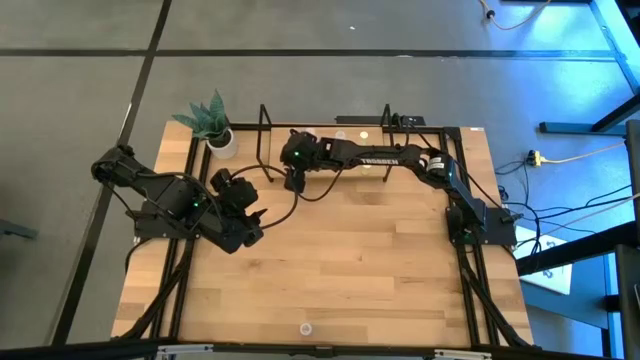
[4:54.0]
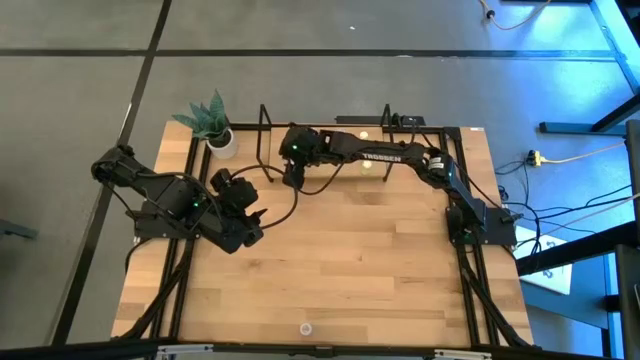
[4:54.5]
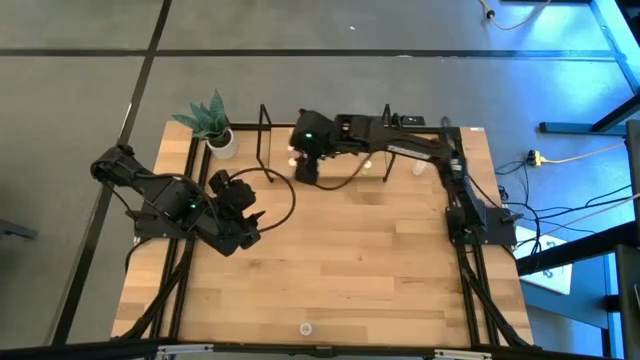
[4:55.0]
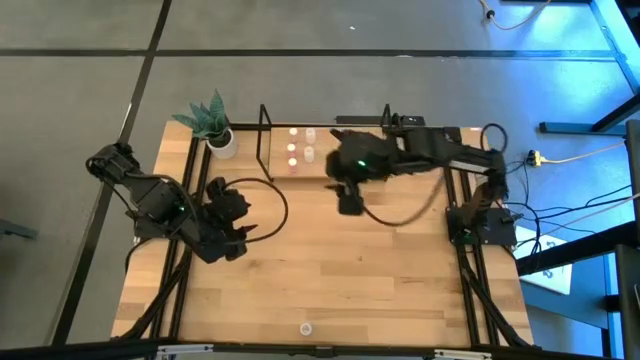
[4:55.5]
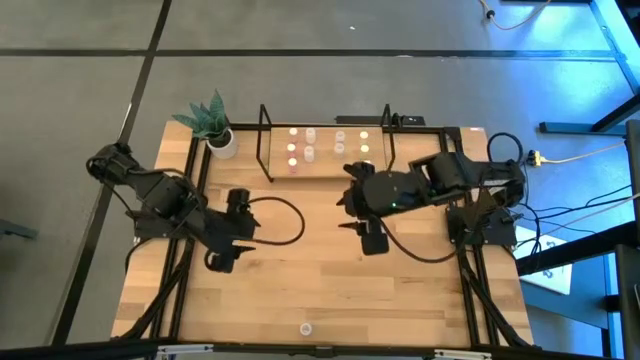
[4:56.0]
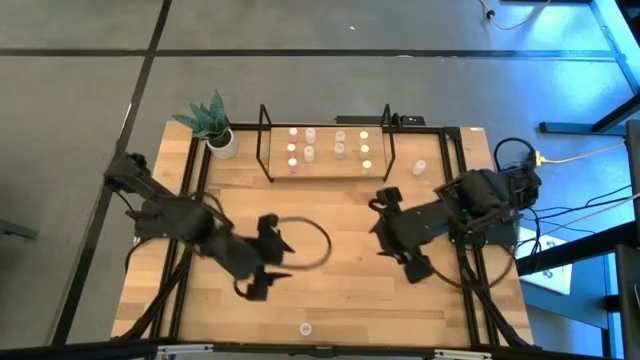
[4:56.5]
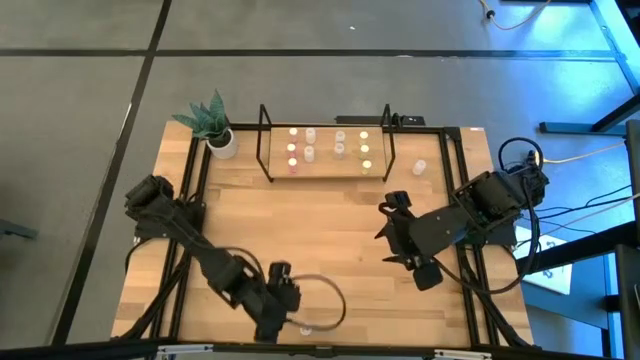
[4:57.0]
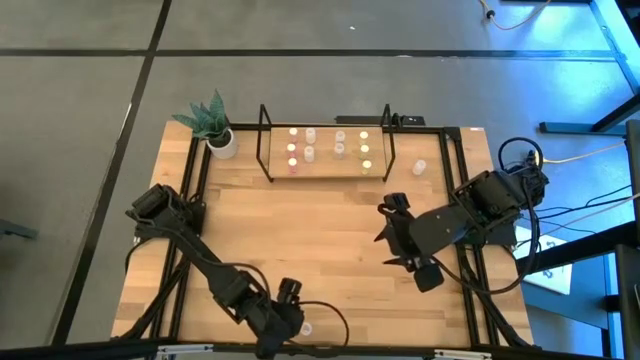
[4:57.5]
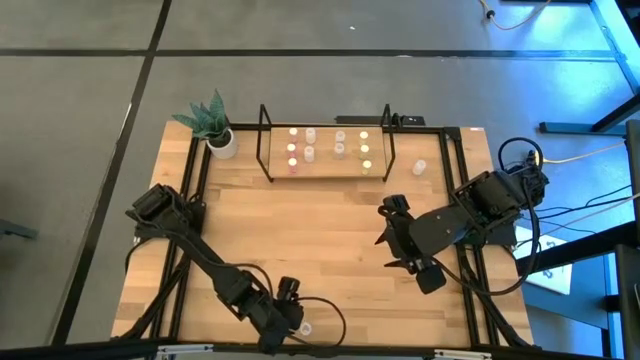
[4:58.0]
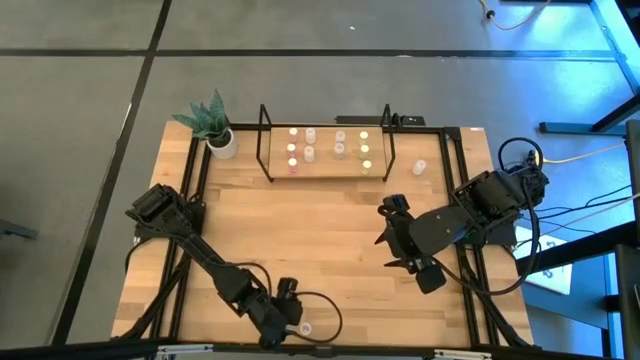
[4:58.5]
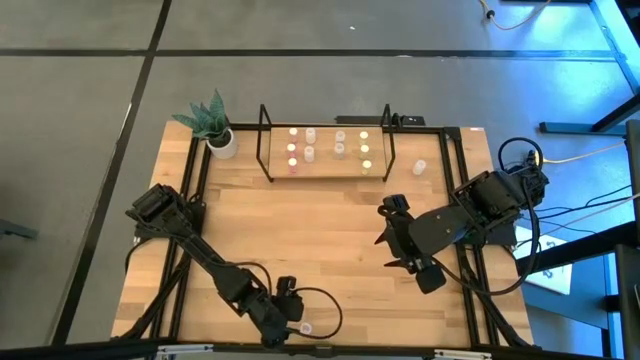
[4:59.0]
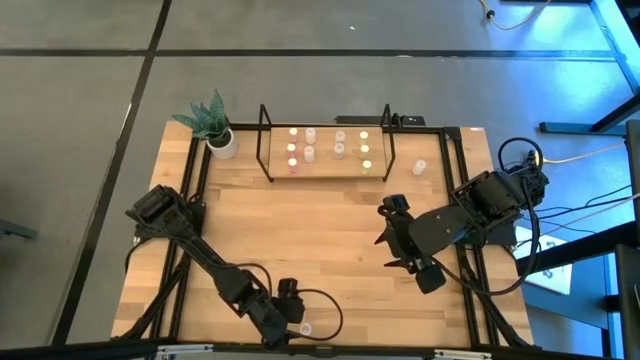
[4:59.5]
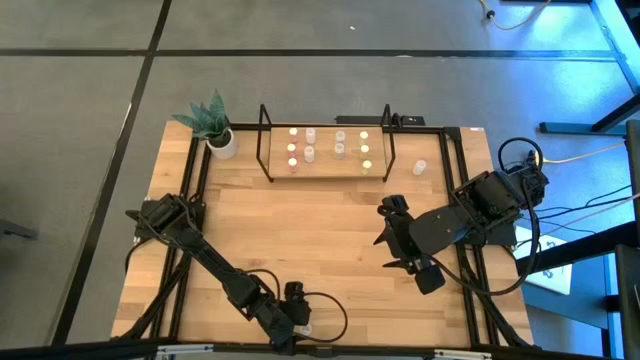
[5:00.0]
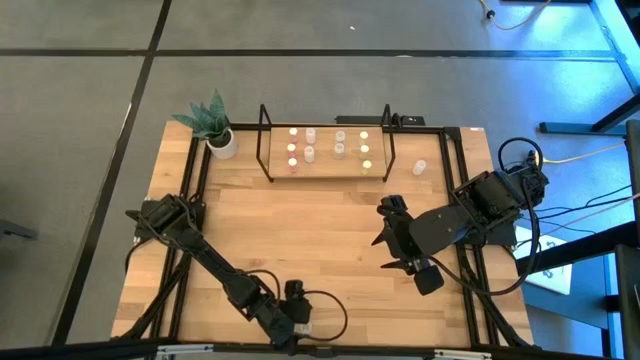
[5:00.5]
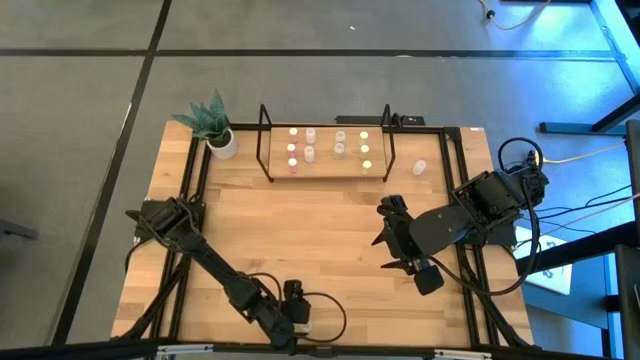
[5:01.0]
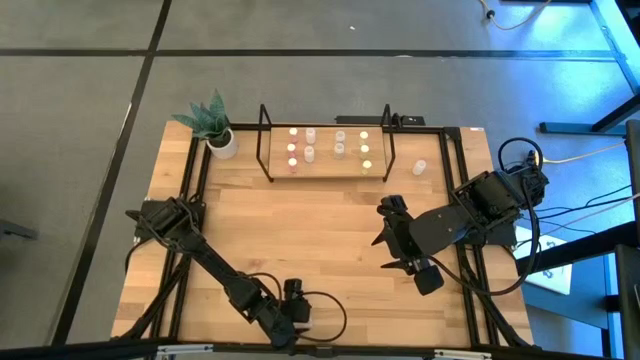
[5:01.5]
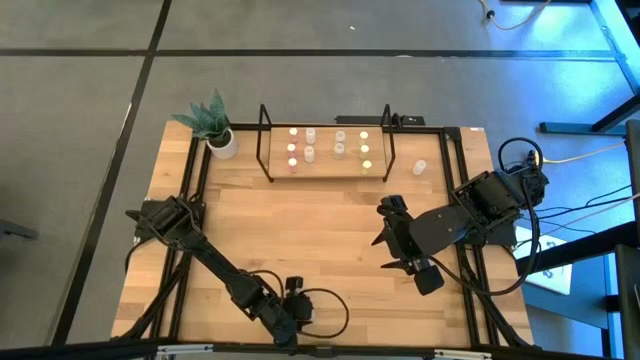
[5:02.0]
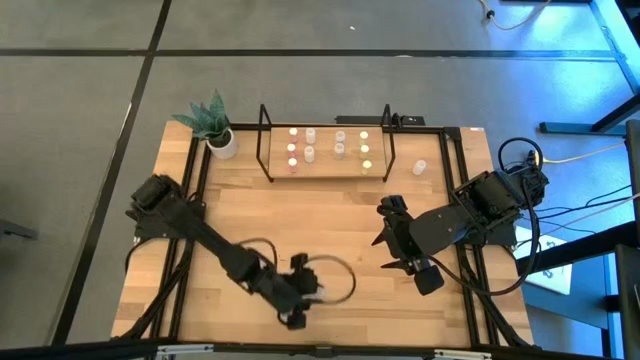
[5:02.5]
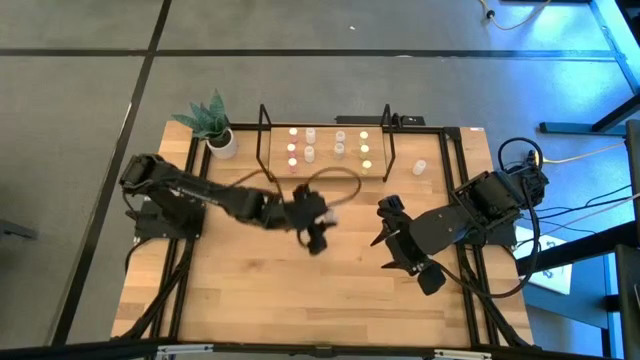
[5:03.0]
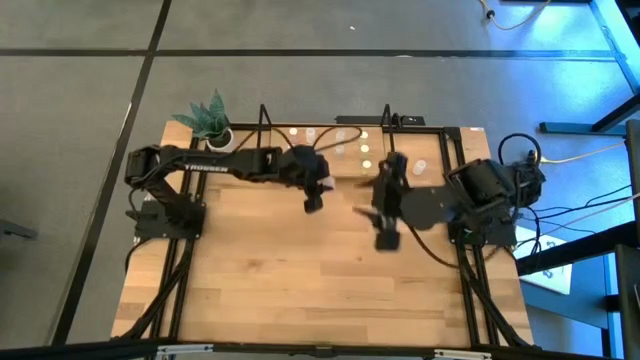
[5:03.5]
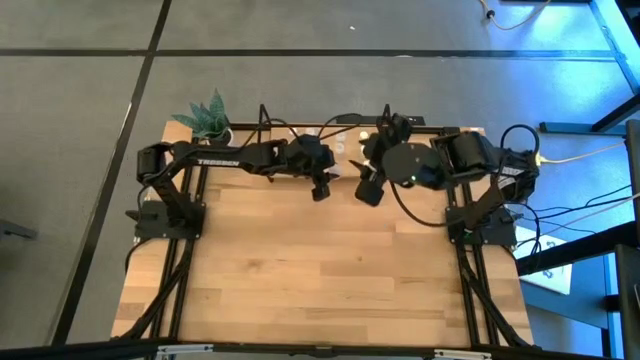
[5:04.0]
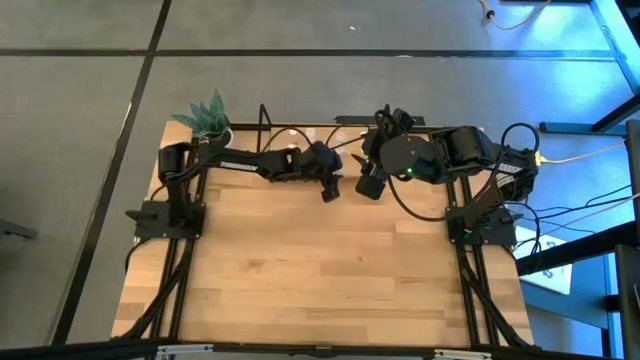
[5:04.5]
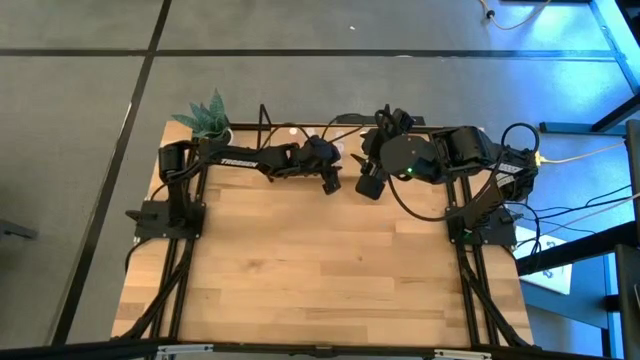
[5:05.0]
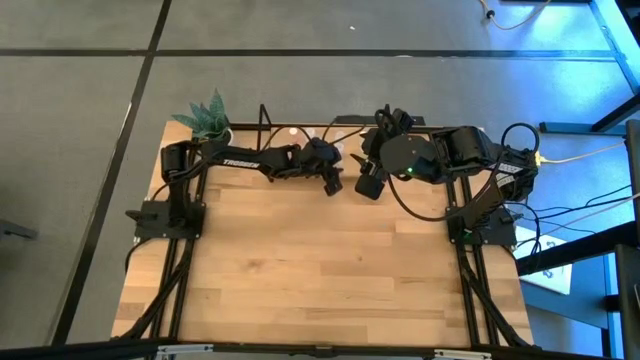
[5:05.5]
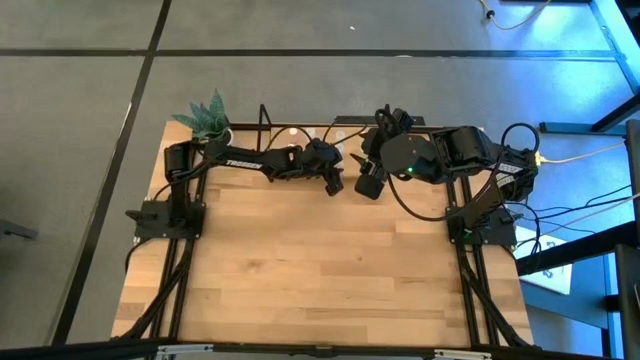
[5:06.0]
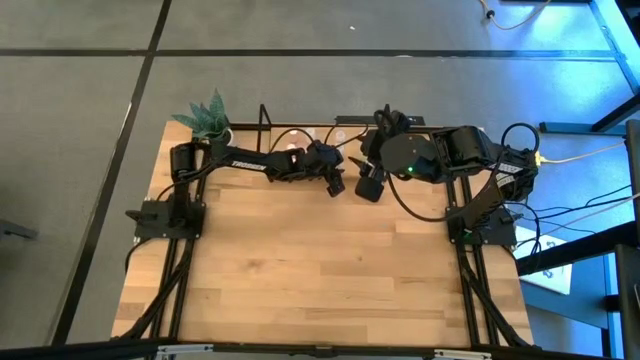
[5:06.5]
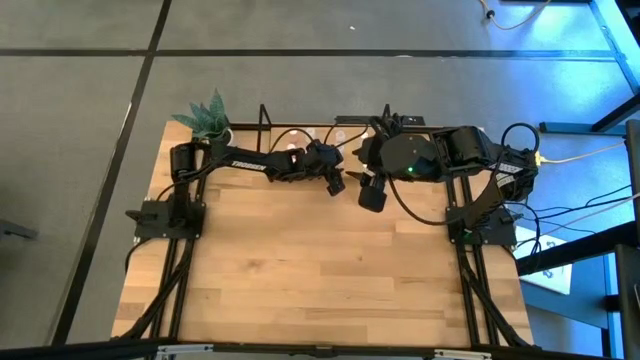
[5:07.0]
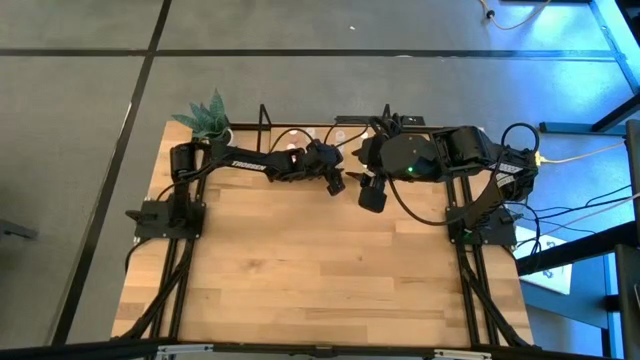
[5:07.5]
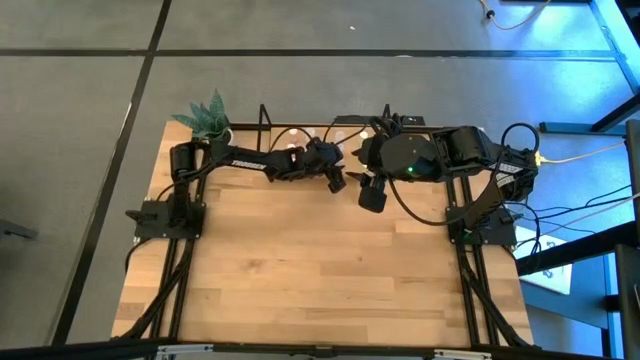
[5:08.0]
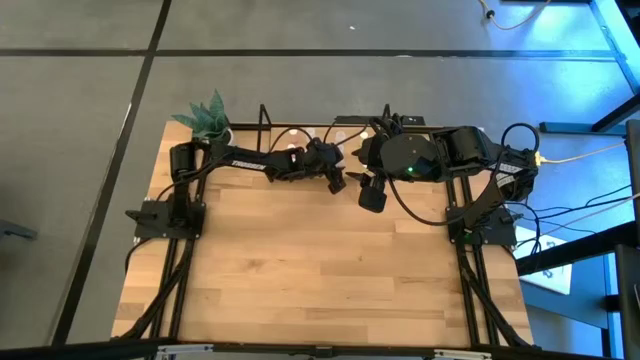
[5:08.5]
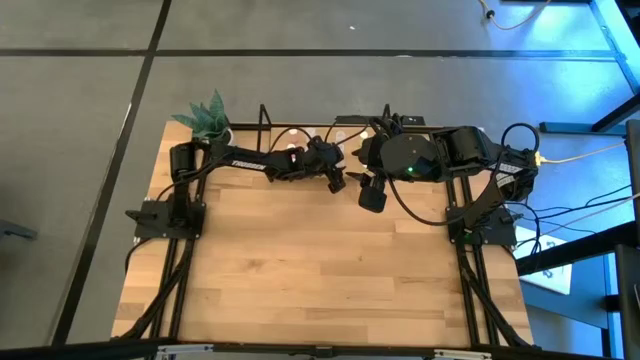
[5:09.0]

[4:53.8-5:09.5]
Task: Pick and place medicine bottles onto shelf by color
Put the transparent pill bottle on the shelf aligned with the other transparent pill bottles

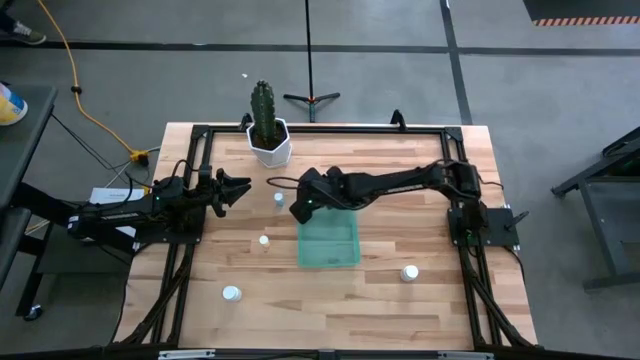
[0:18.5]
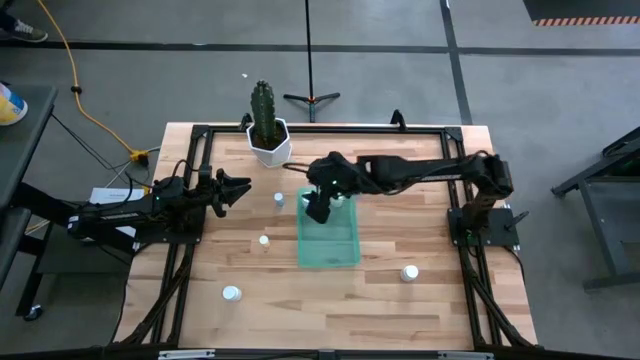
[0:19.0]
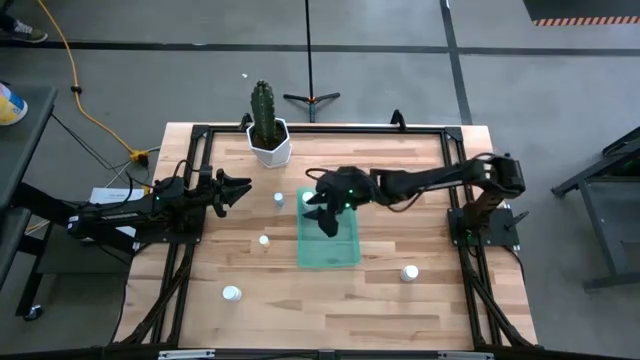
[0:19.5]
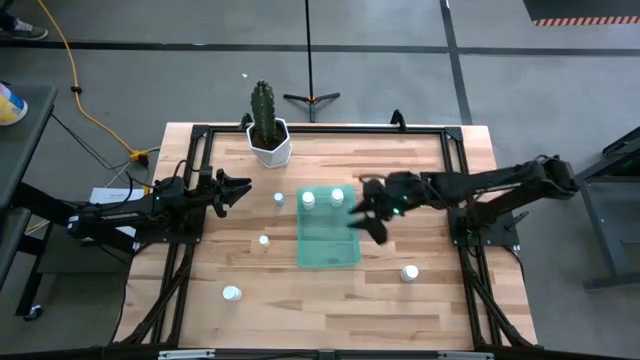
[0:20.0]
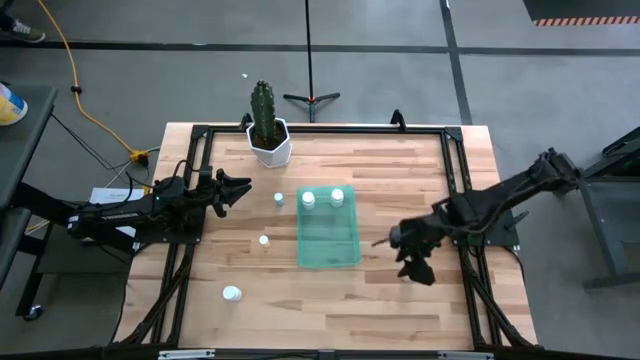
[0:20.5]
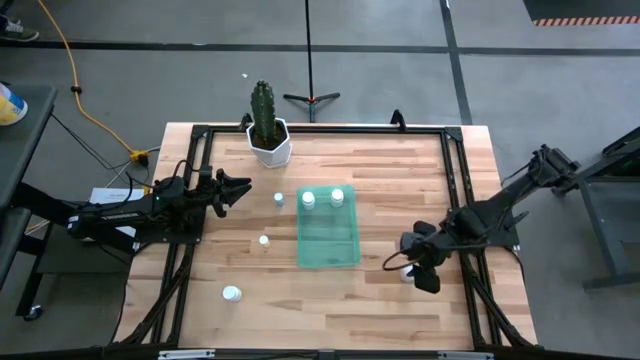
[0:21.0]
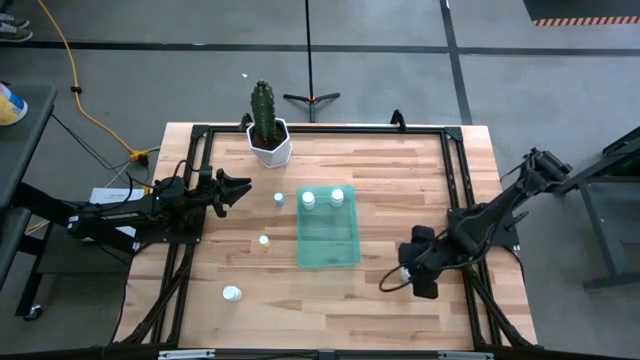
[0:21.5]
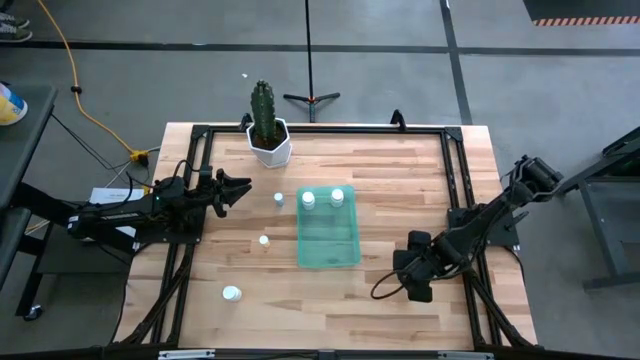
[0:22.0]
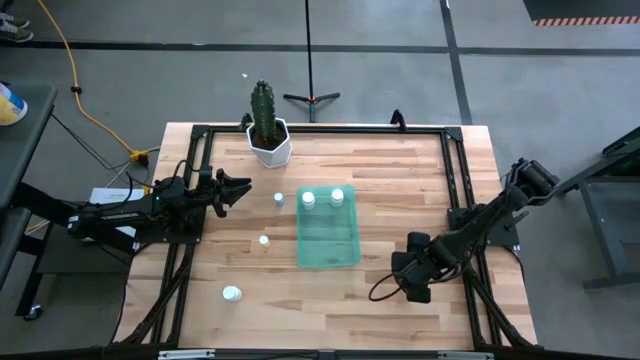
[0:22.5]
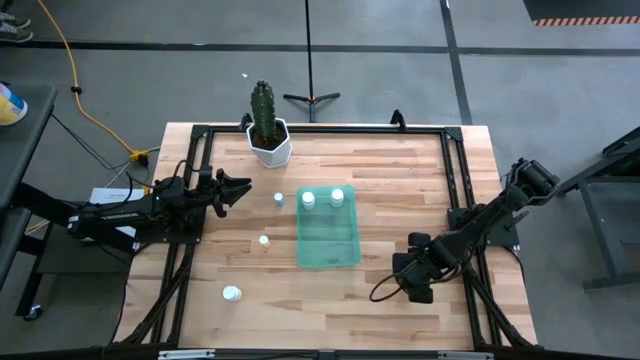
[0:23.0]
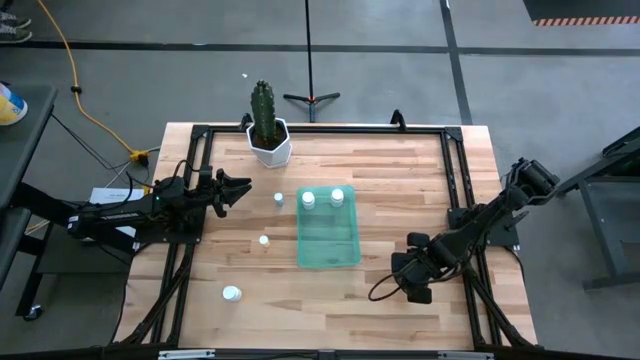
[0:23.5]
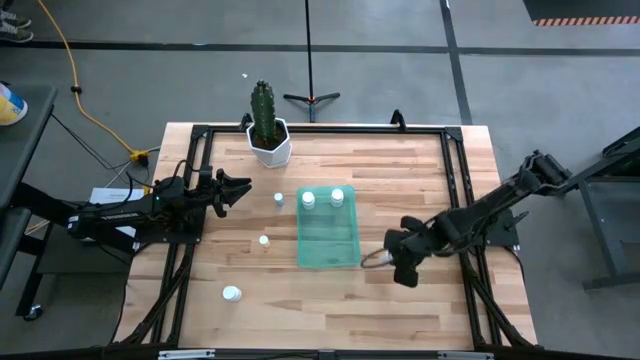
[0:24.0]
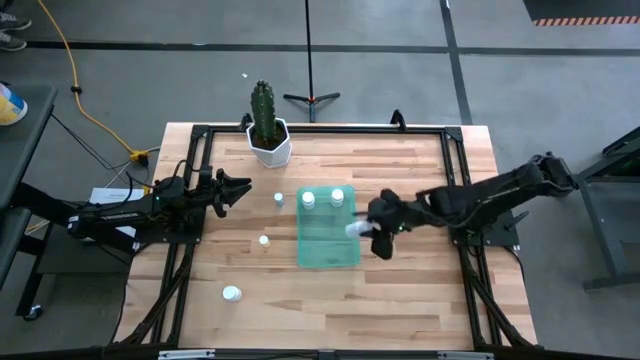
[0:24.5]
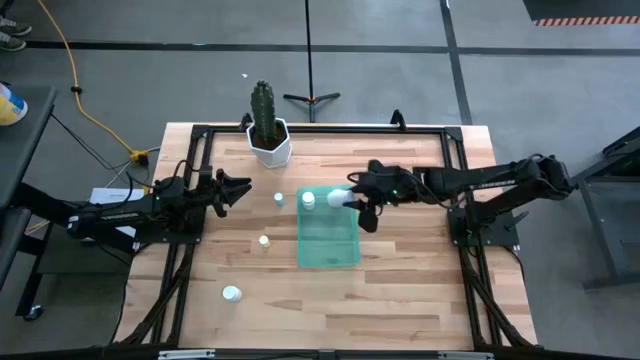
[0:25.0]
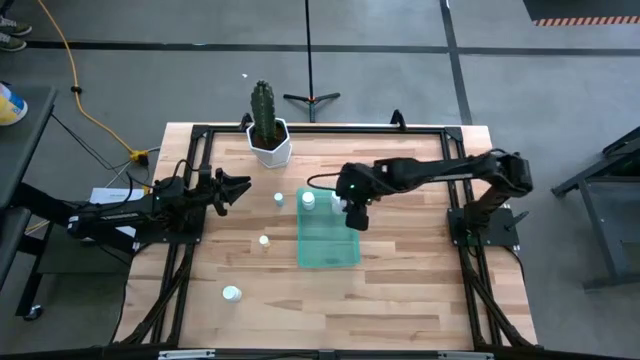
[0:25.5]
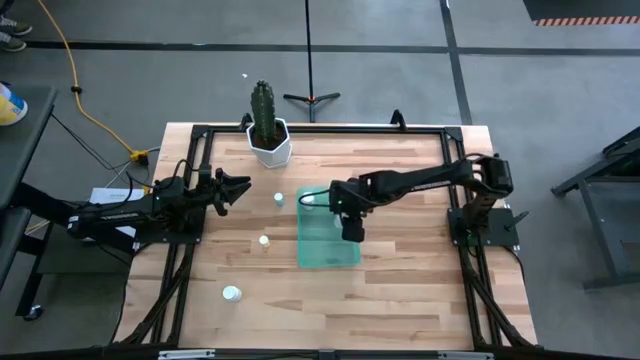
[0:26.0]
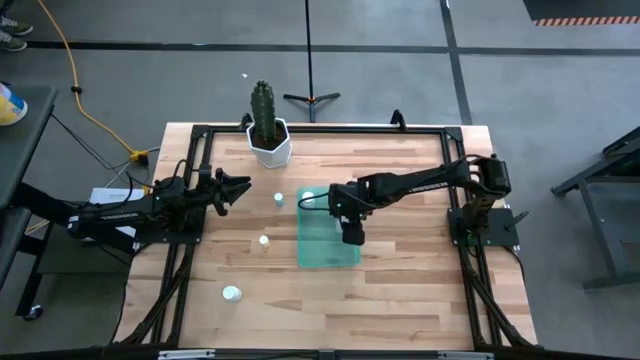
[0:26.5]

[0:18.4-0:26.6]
Task: Pick and place pill bottles into a basket
Put the white pill bottle into the green bin
